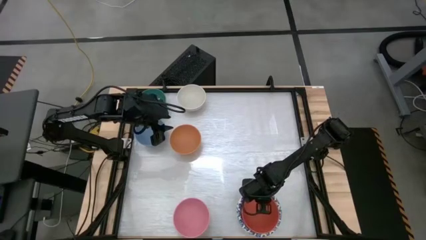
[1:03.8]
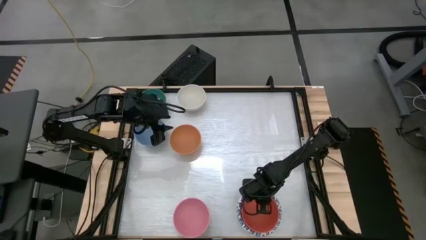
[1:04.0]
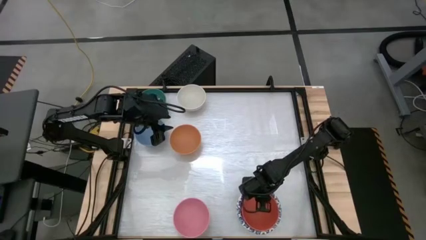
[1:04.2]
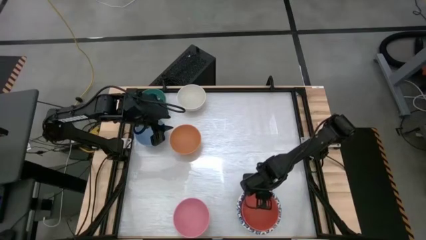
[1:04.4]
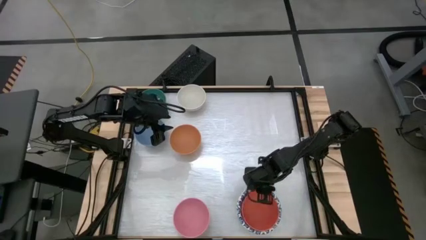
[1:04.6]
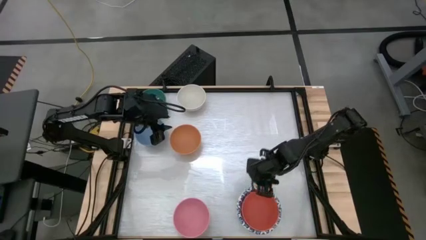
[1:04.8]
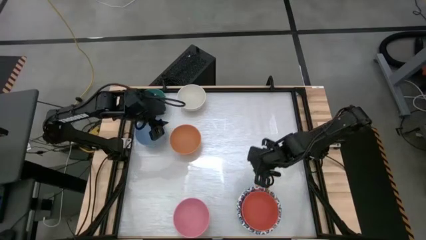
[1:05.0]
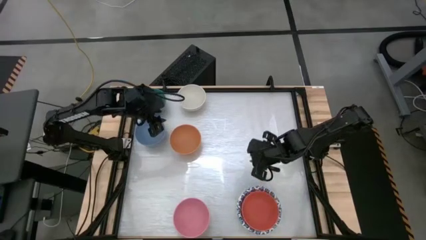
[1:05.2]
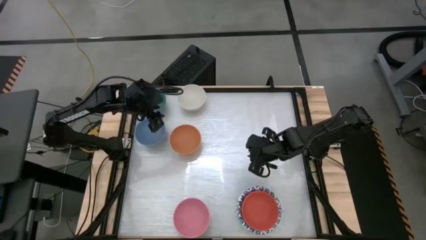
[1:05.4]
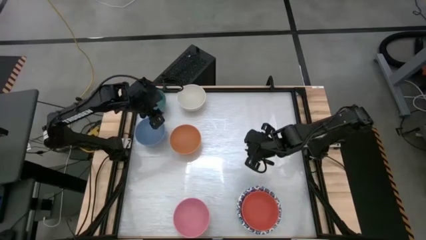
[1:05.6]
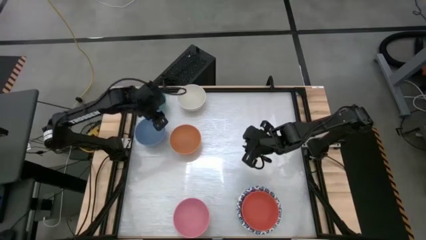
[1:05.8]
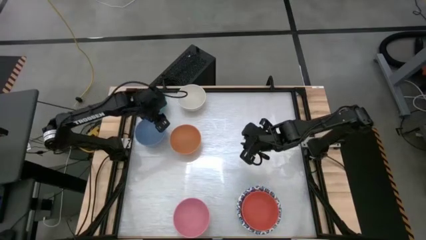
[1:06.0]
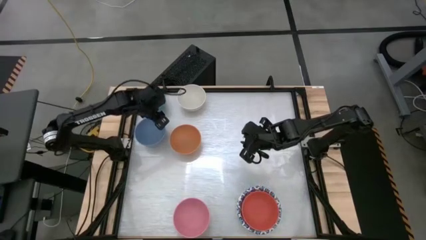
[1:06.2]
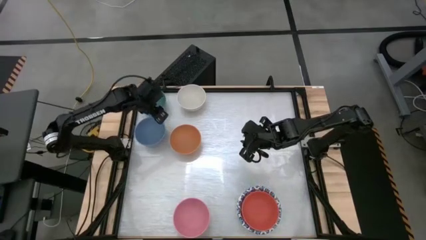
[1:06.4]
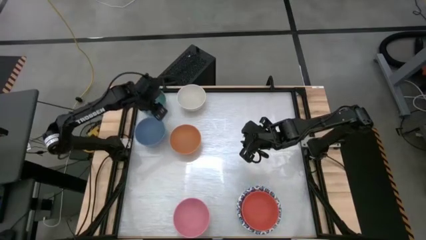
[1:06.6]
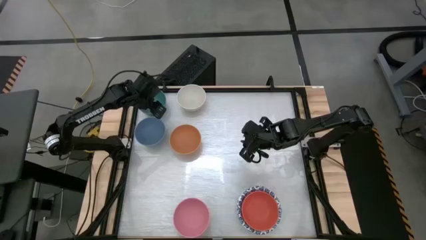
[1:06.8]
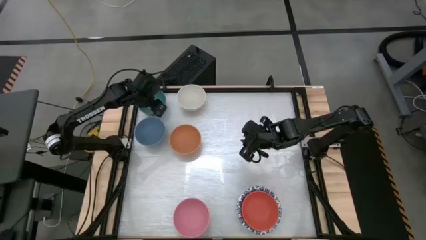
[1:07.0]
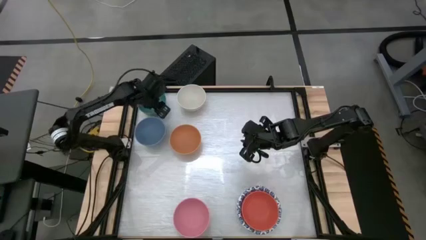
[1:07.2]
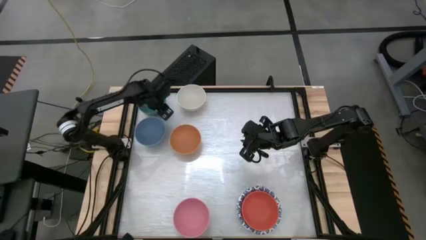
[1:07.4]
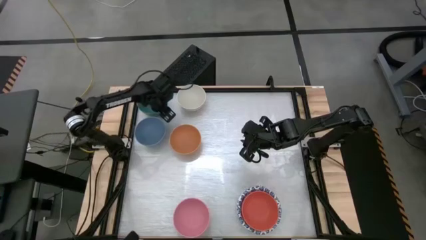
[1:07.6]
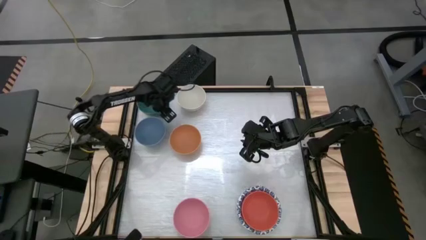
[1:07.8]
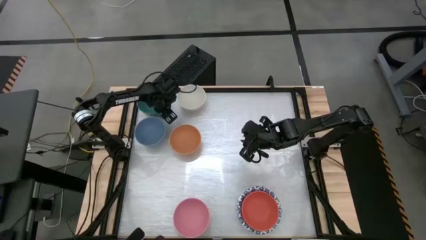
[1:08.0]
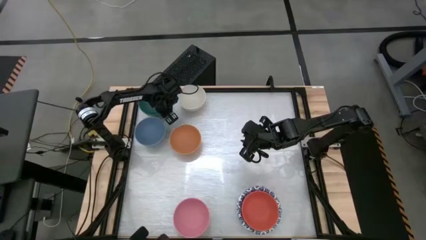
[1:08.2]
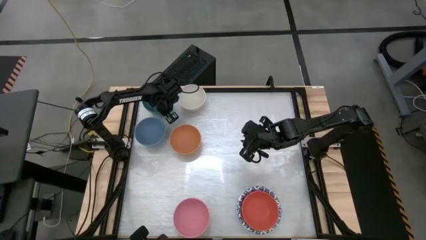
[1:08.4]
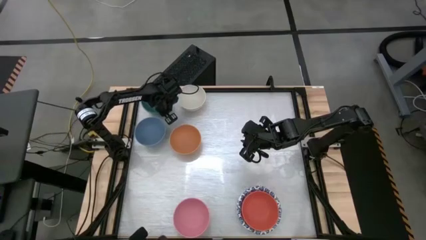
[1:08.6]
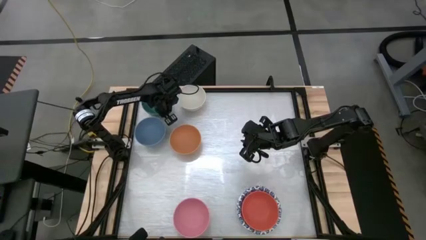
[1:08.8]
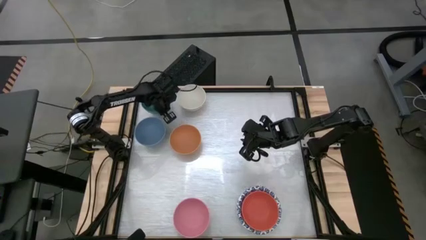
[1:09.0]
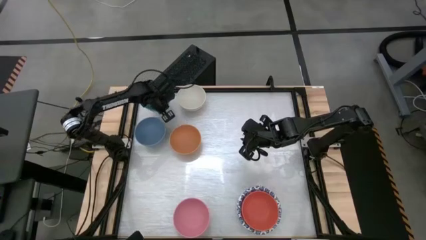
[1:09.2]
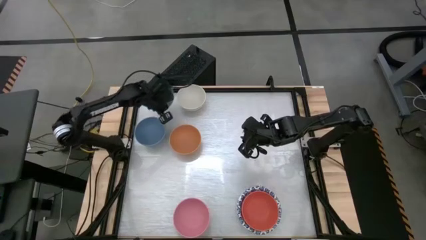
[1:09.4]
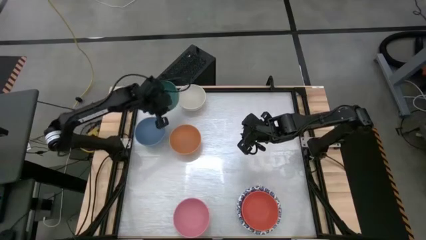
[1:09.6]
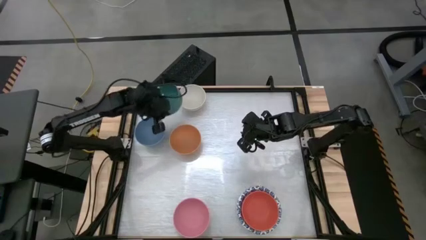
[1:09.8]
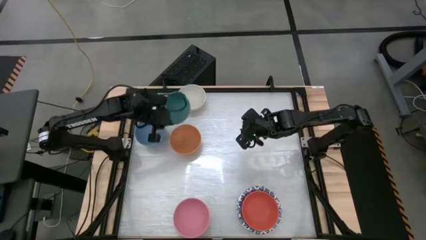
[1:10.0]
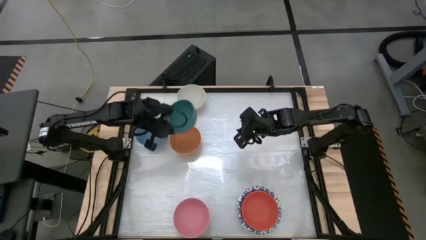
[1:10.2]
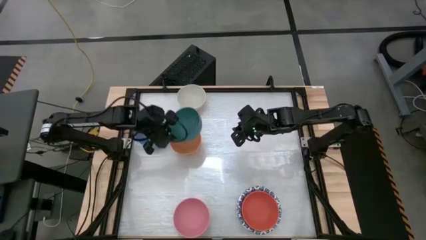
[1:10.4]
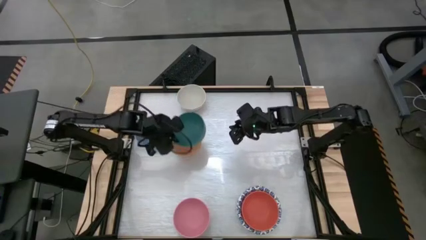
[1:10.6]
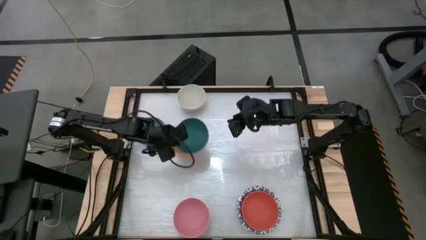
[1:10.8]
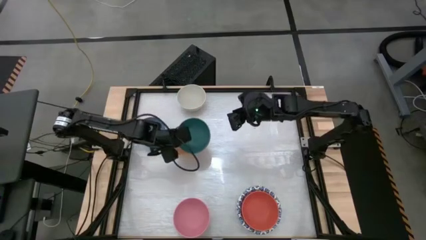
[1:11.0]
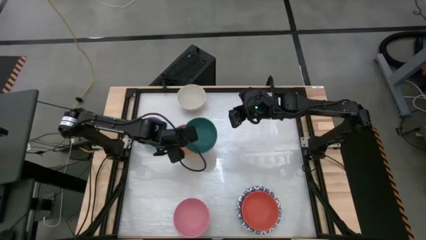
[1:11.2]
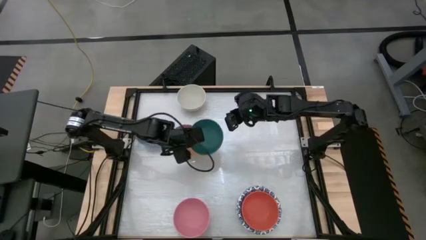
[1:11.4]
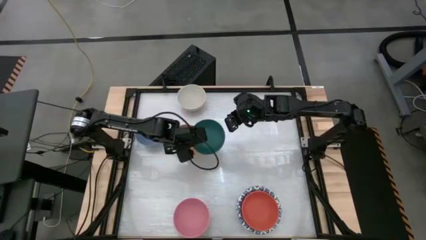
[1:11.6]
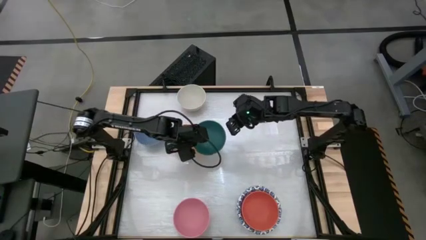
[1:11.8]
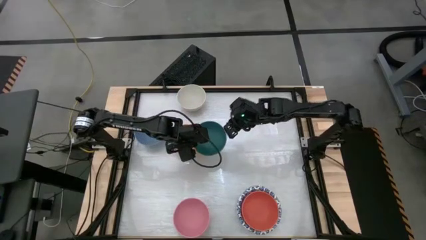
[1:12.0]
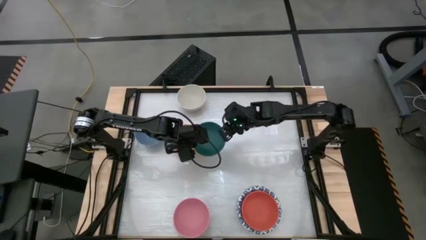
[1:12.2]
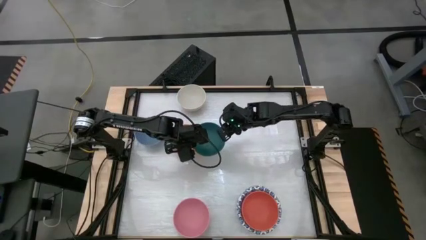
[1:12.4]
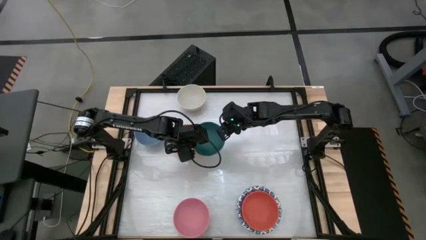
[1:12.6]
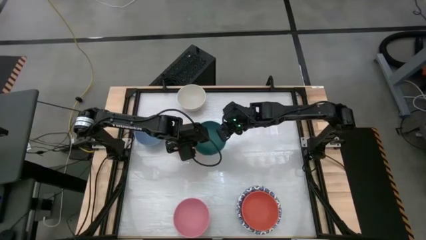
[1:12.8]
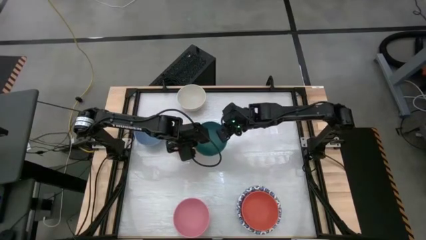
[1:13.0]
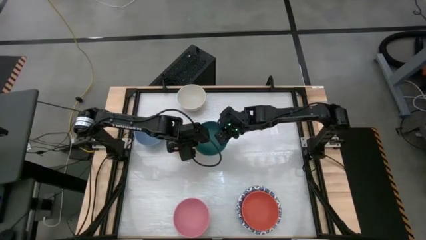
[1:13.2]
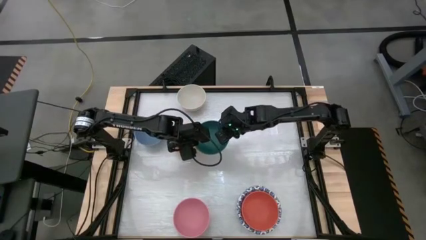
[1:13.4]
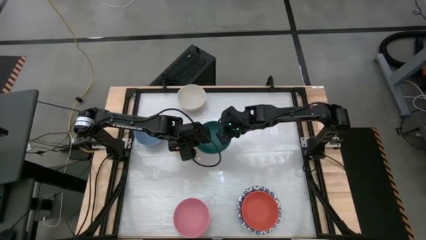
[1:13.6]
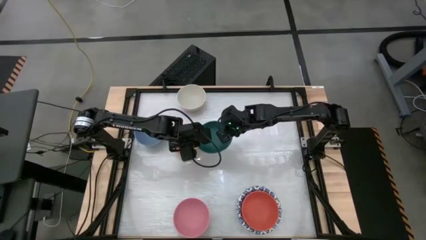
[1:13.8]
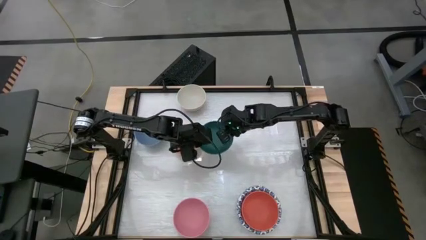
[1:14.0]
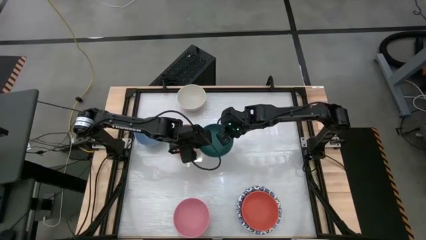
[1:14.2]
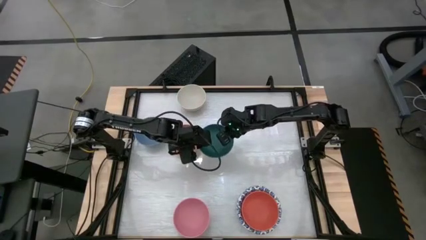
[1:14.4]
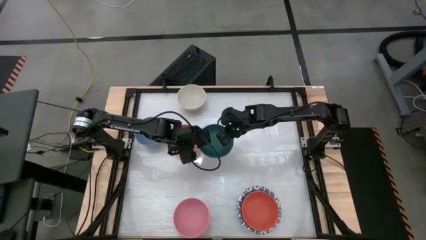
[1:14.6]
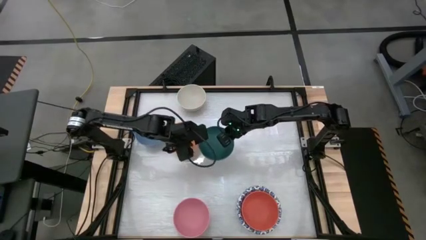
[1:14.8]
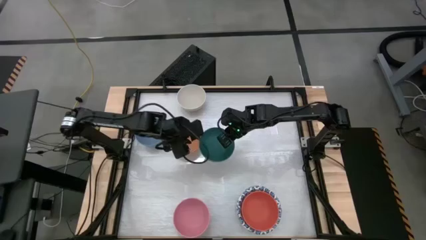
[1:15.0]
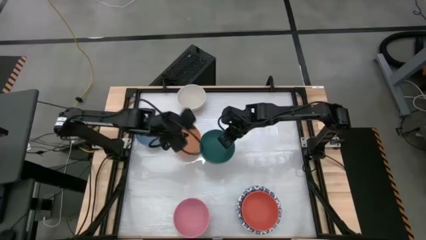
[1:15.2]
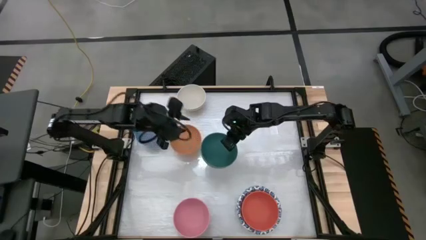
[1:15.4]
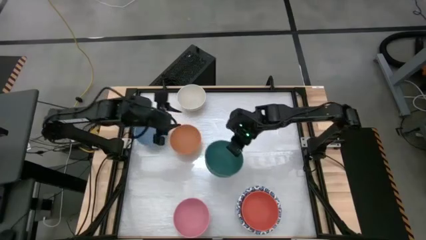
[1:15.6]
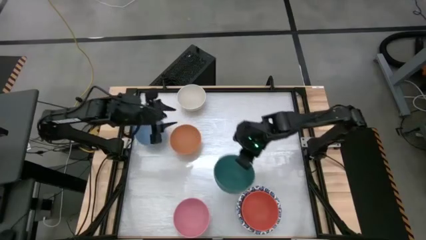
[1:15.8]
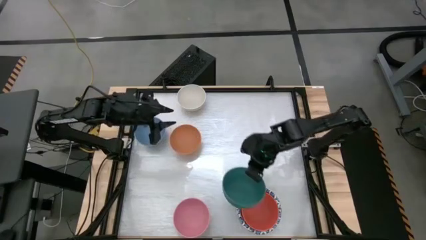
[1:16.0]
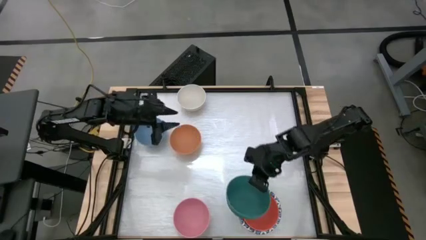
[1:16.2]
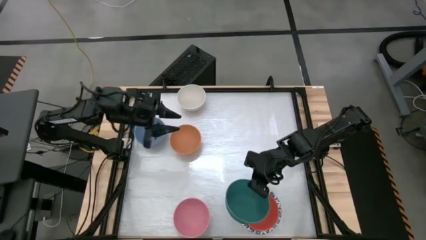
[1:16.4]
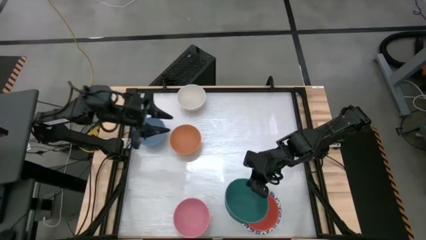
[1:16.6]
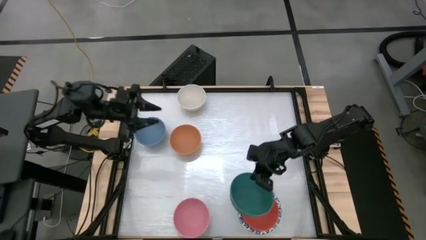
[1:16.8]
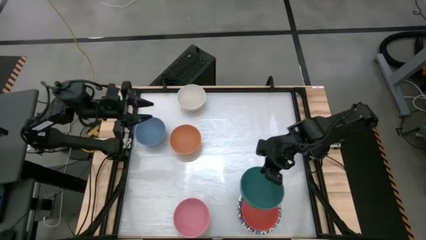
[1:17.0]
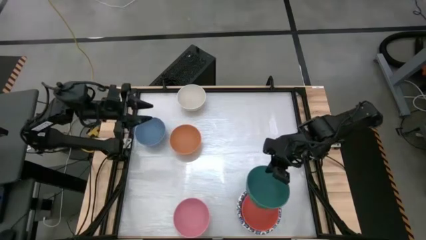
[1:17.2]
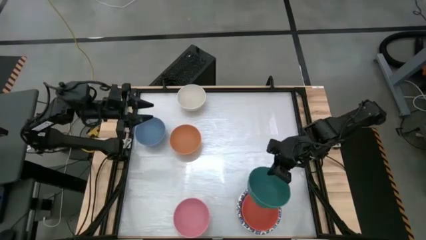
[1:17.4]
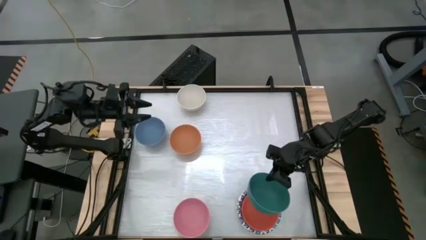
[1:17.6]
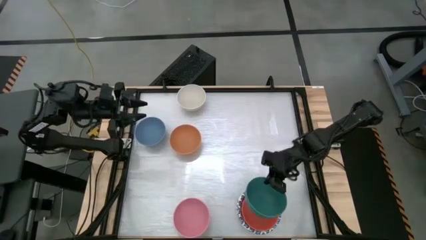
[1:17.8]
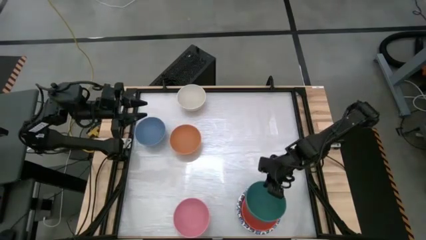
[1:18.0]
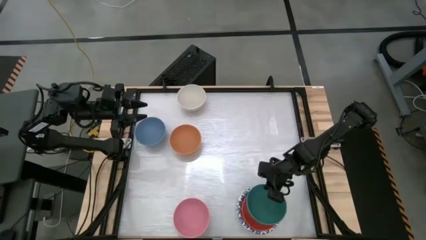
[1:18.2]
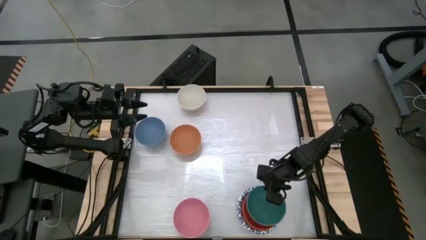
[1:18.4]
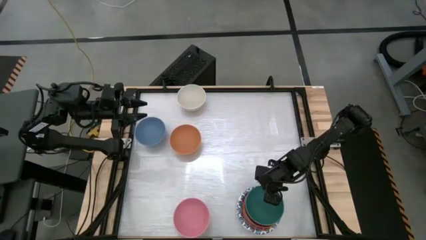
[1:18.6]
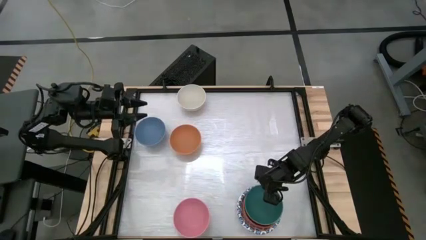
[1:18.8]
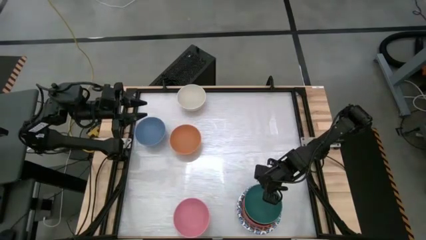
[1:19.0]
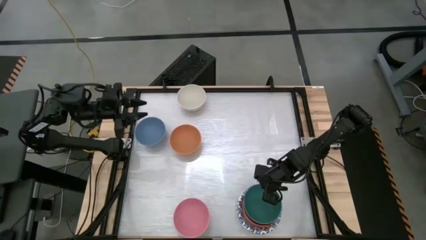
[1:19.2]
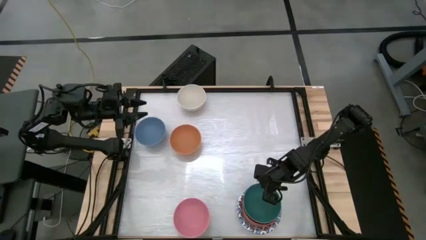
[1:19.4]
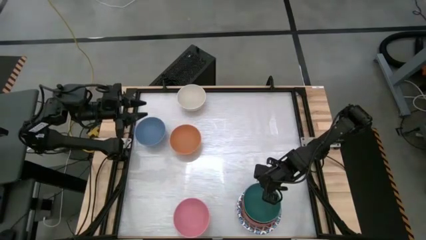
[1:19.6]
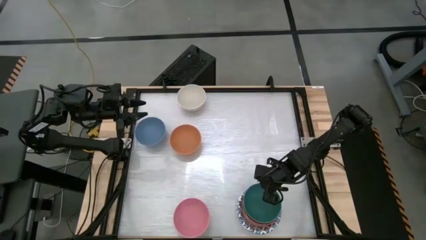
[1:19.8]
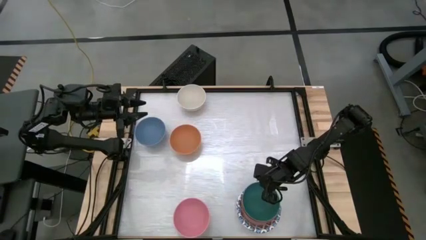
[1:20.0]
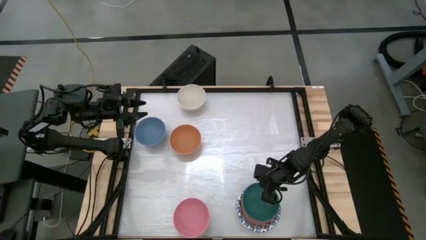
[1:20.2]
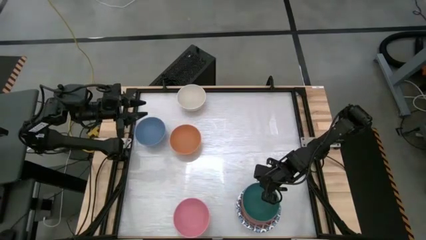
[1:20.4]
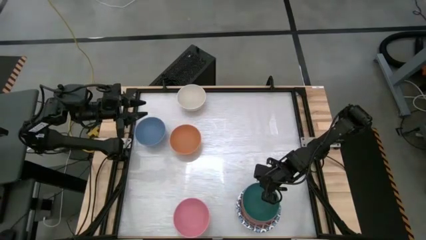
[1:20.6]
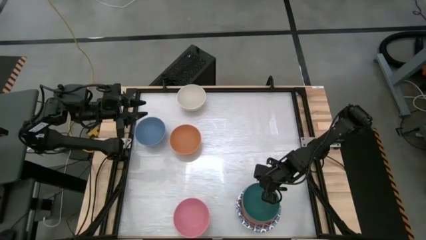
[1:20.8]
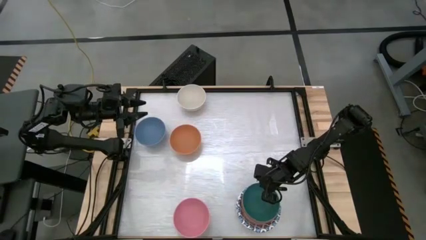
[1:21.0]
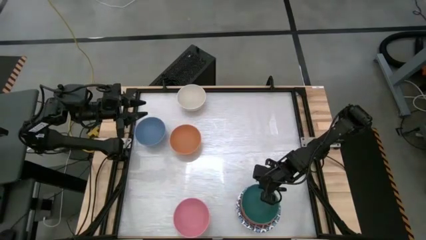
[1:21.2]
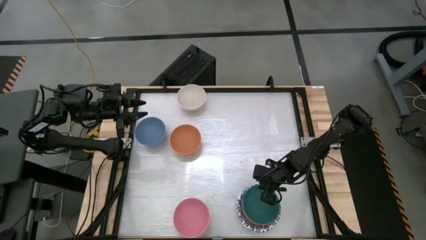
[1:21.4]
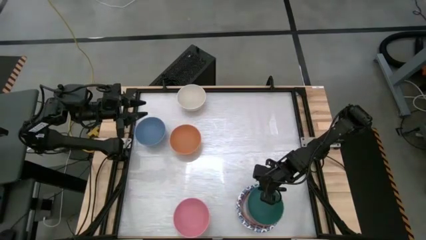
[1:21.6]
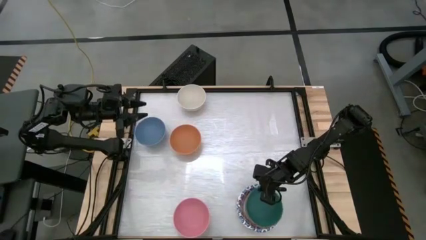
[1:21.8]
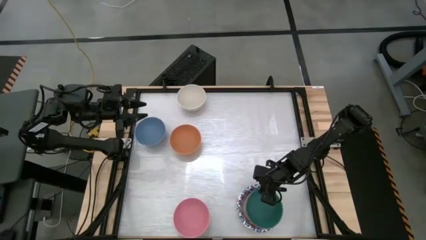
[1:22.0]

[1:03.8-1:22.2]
Stack the green bowl on top of the other orange bowl
